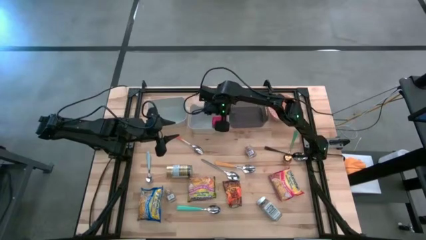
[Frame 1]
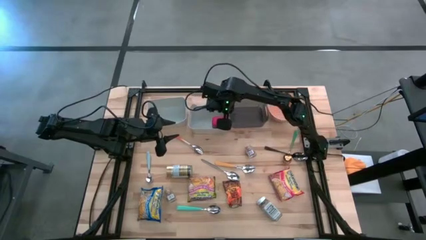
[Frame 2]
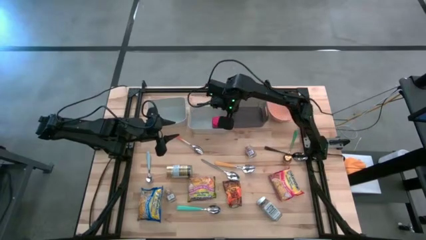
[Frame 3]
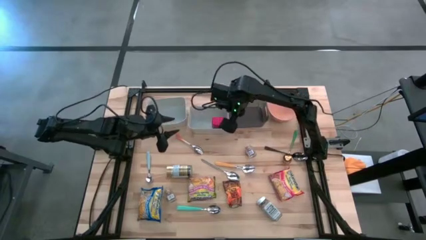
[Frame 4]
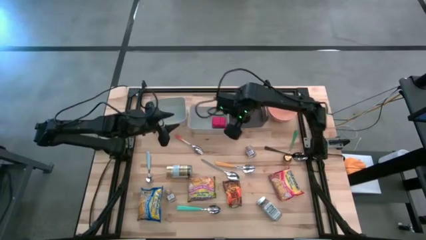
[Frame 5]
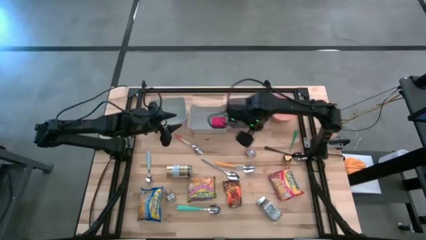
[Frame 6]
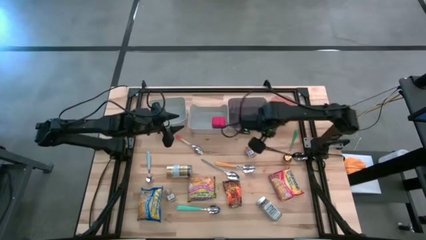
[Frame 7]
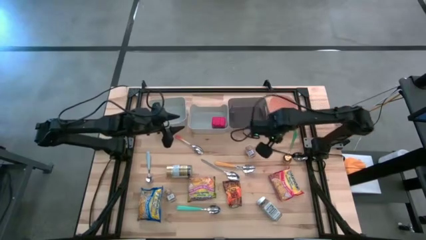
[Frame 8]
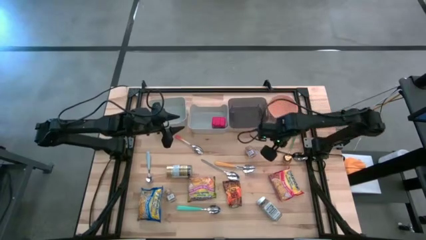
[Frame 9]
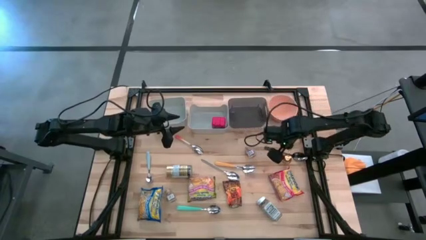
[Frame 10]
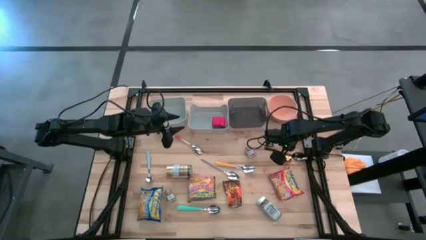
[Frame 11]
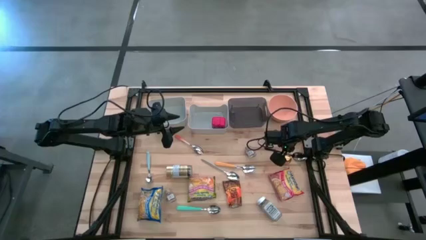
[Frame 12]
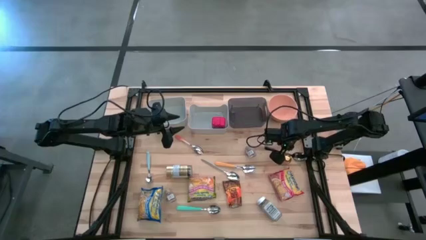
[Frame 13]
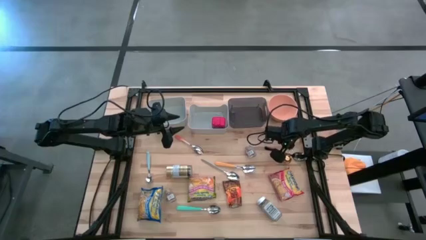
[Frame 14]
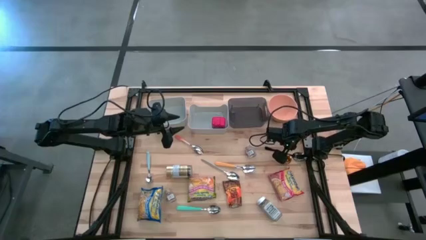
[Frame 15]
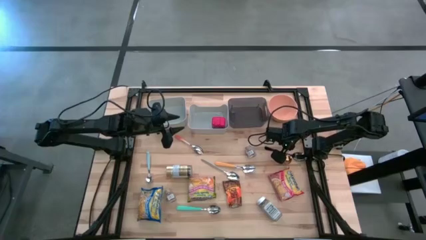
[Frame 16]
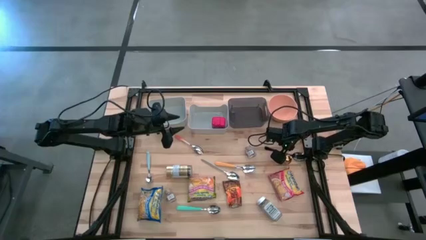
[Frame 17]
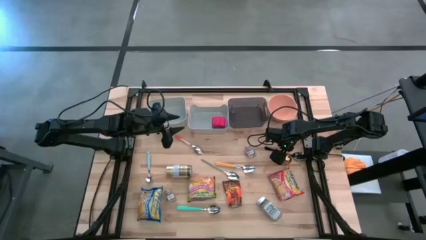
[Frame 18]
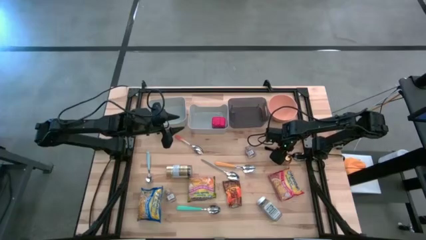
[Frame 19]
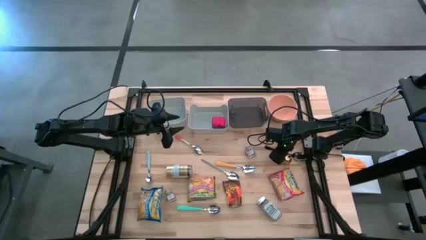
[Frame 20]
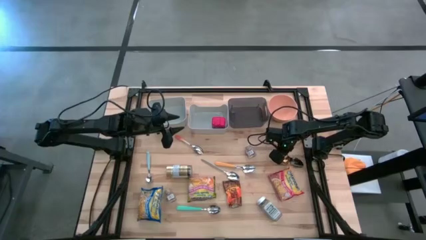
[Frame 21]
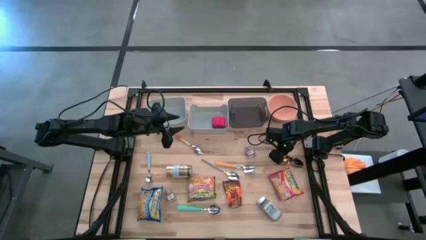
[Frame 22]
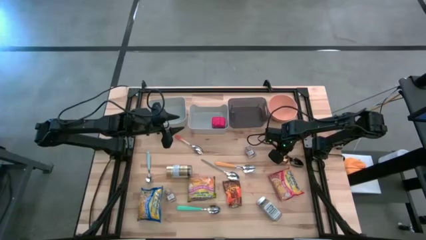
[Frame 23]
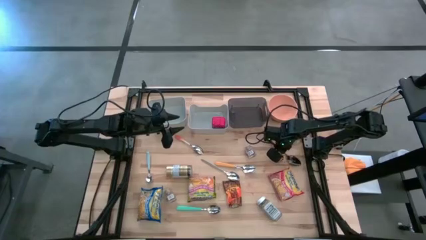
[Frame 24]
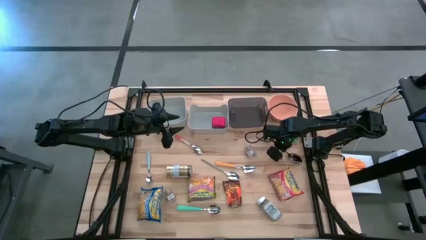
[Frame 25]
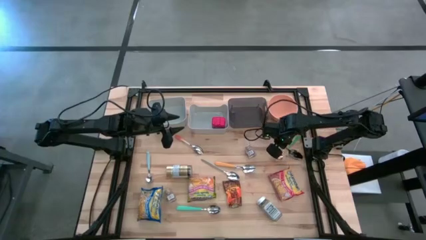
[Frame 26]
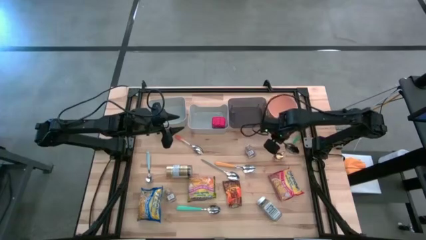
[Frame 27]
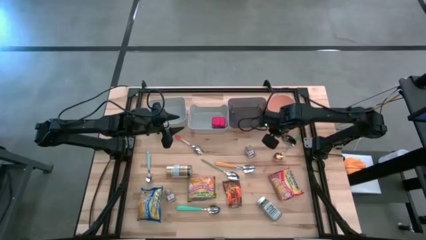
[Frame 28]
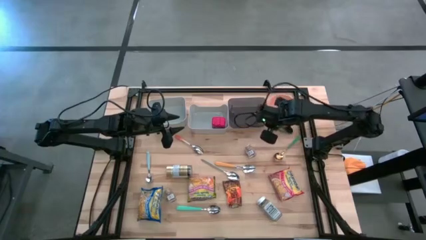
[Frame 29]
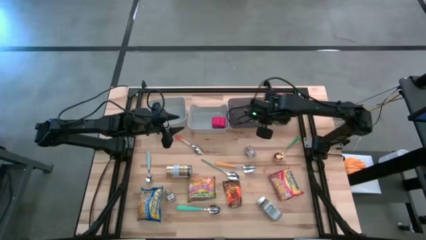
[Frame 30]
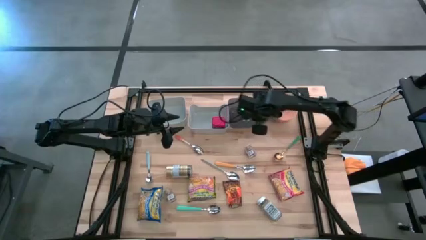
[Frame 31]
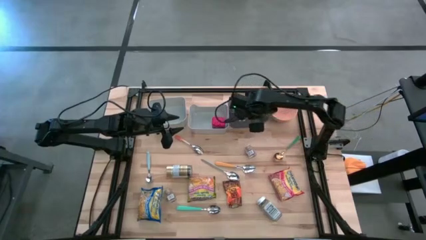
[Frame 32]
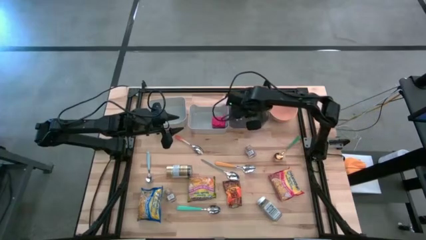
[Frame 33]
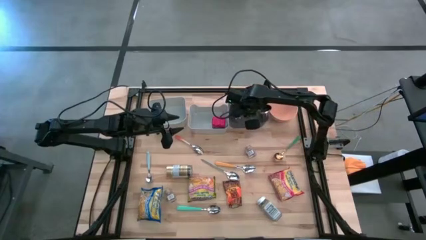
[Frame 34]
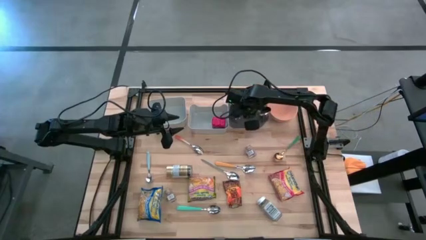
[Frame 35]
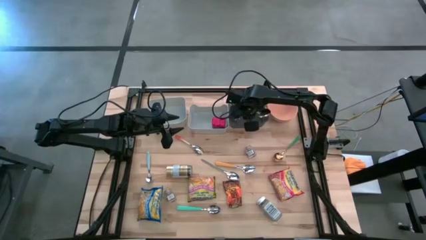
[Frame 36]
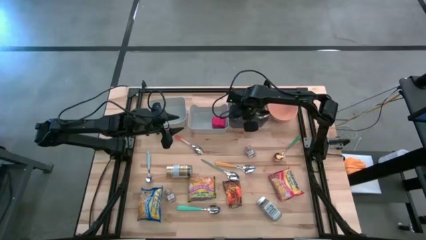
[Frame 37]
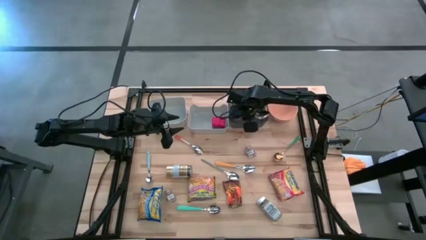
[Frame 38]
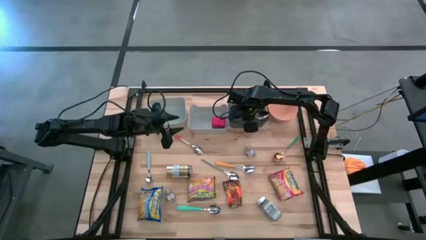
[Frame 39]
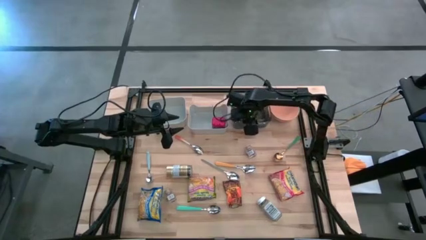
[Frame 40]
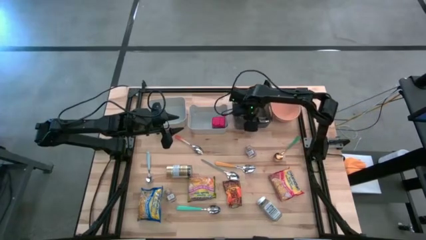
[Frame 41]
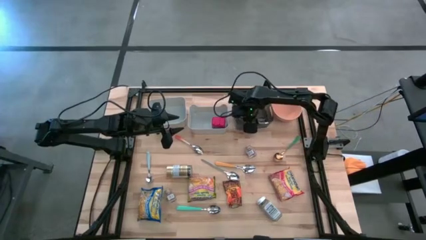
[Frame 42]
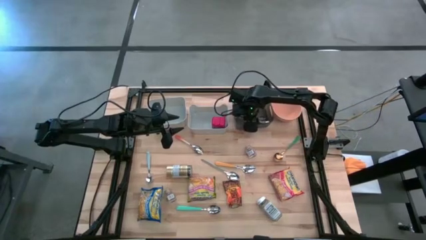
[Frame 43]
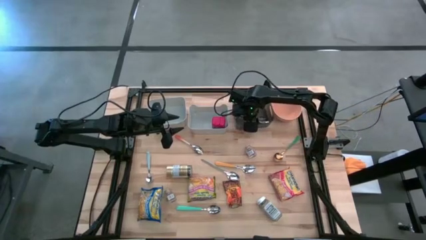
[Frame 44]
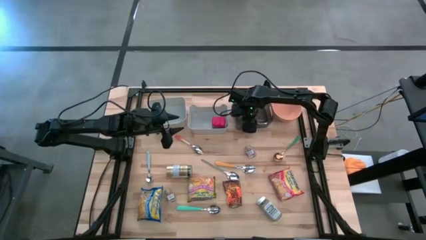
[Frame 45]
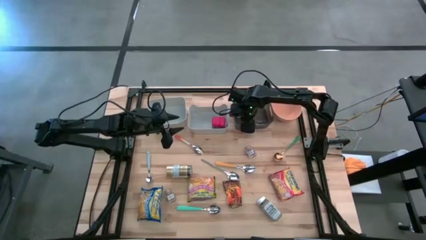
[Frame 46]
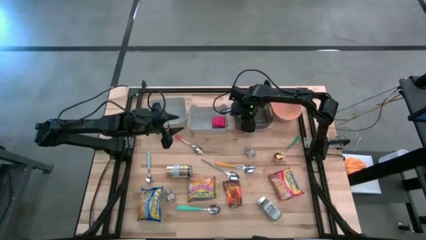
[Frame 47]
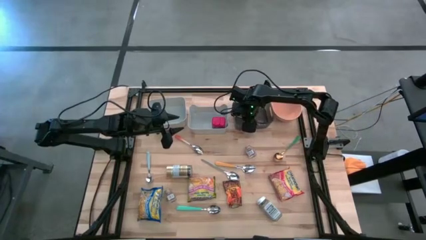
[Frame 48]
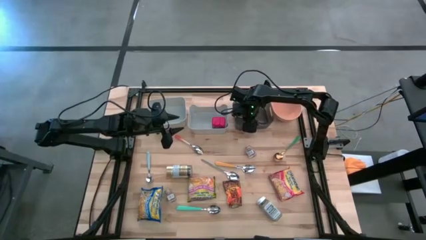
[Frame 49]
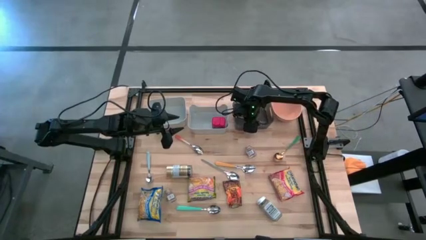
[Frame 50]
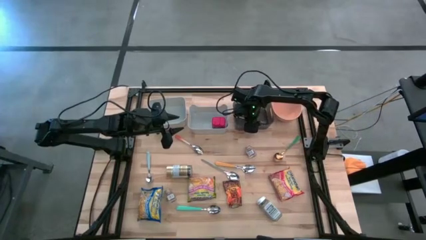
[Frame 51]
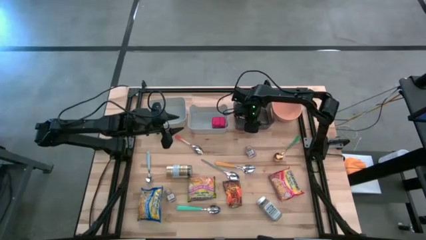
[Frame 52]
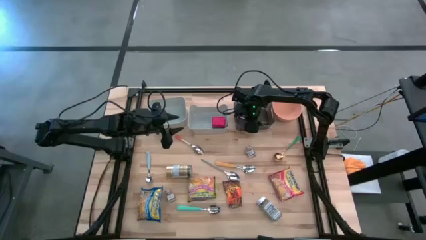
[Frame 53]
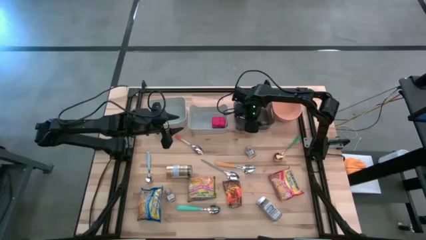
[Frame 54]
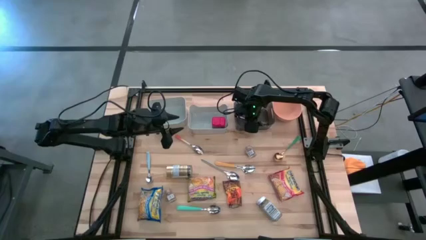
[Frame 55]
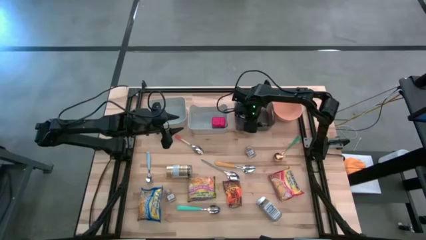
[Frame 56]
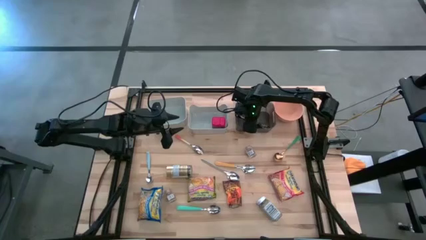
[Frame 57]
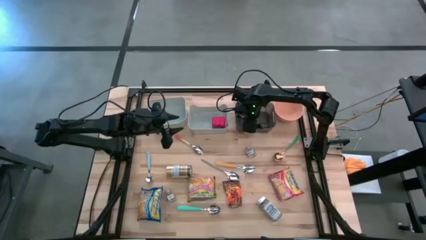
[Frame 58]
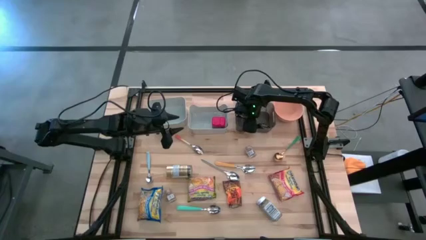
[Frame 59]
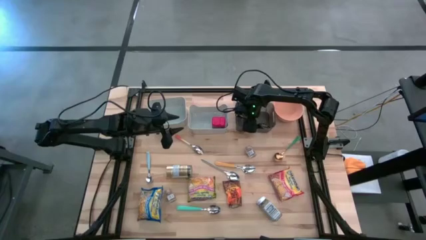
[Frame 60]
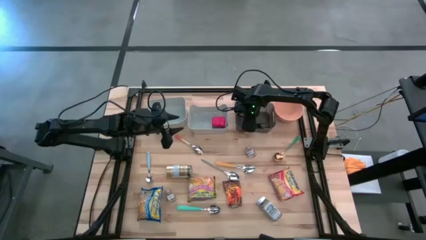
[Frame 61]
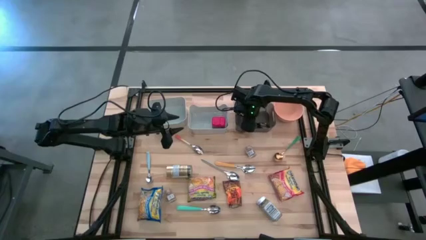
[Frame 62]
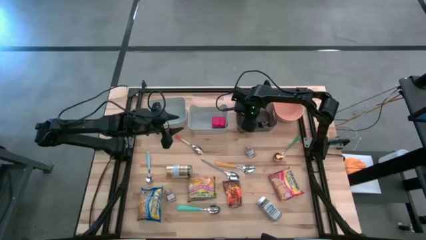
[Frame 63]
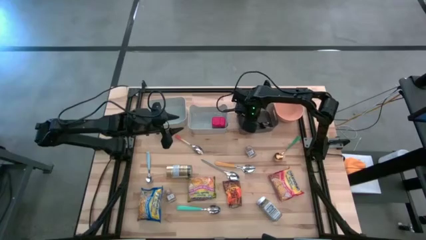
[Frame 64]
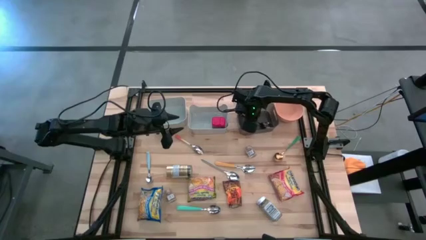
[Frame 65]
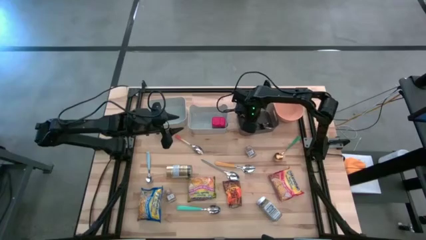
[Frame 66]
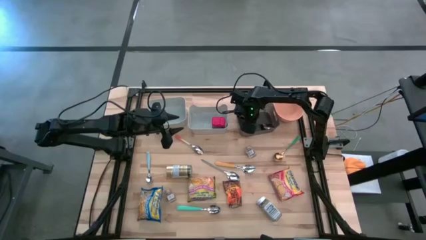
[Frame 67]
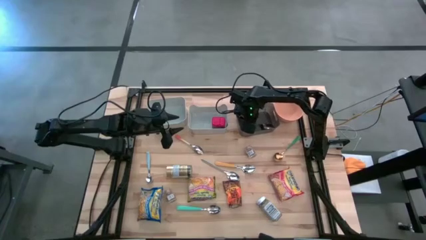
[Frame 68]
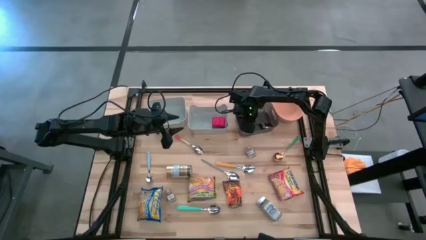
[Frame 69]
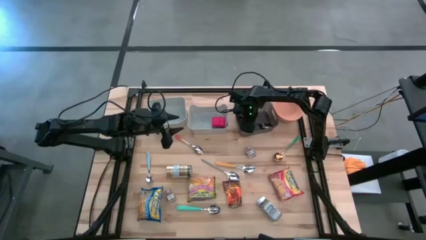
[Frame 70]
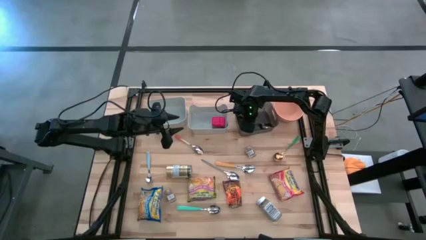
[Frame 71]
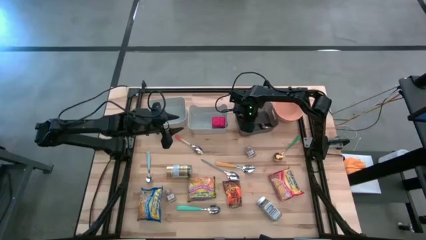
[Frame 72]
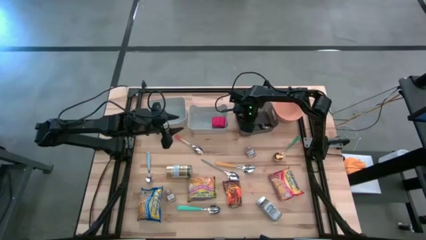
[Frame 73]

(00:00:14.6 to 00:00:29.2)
Put the black spoon into the black bin
